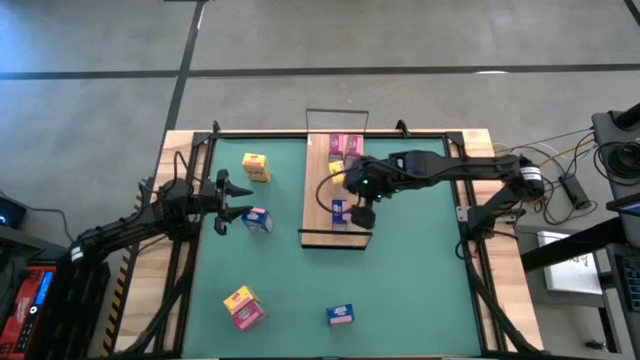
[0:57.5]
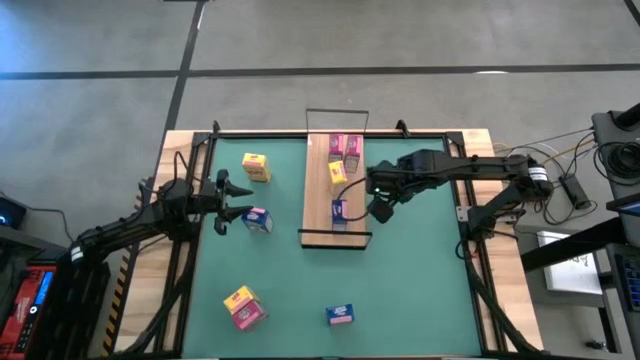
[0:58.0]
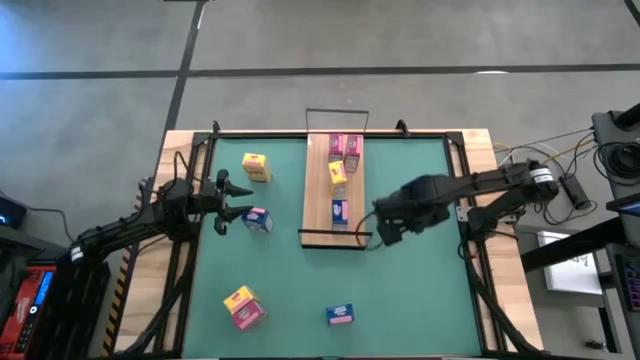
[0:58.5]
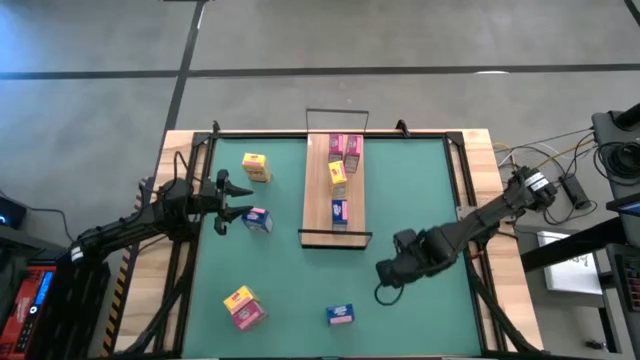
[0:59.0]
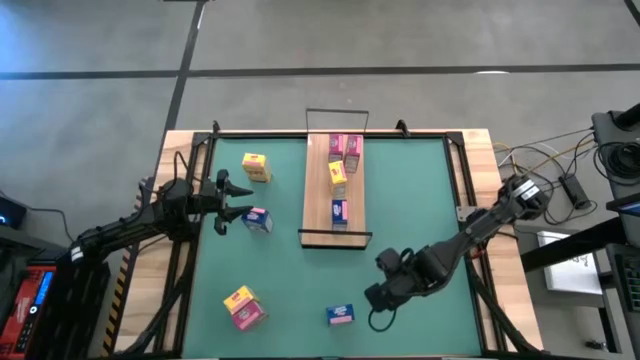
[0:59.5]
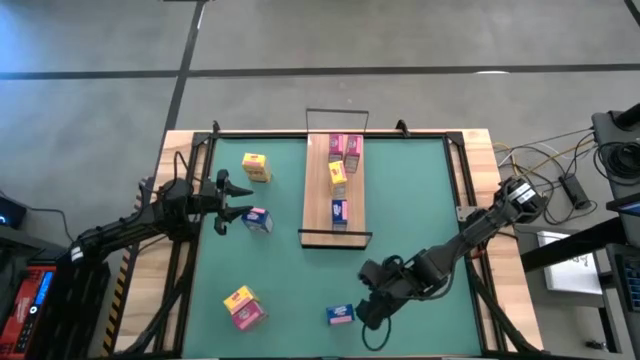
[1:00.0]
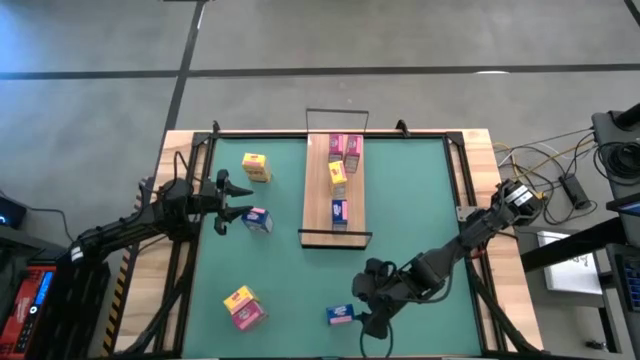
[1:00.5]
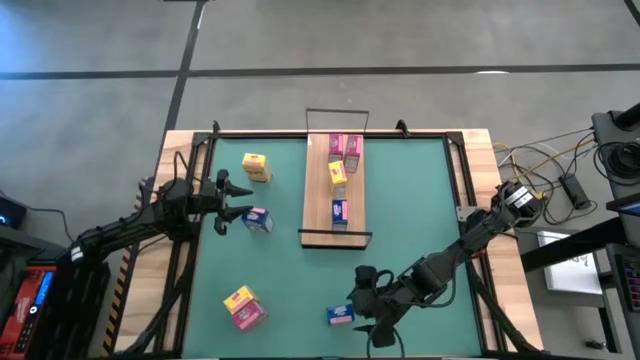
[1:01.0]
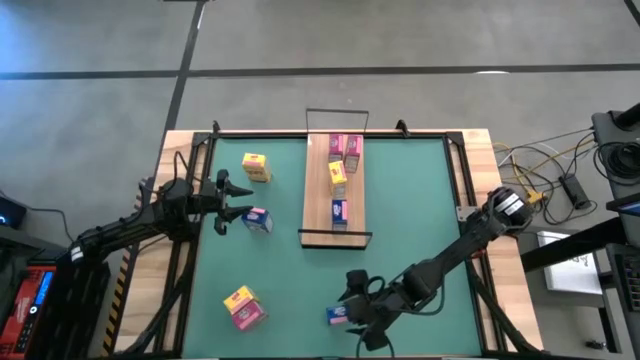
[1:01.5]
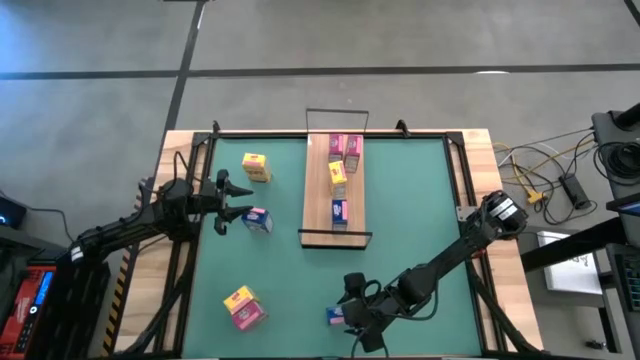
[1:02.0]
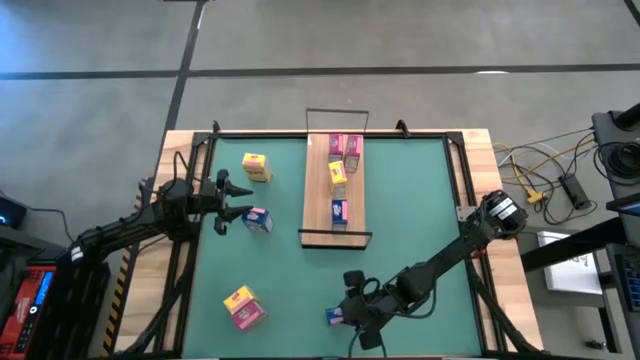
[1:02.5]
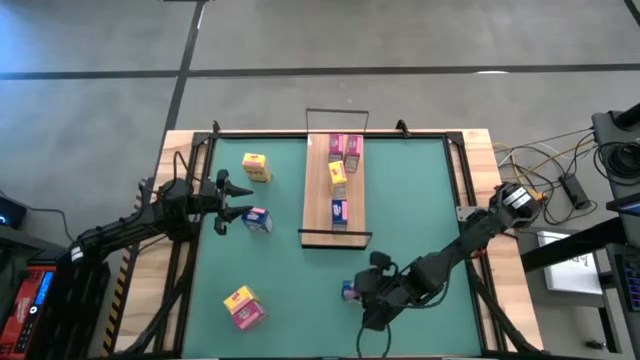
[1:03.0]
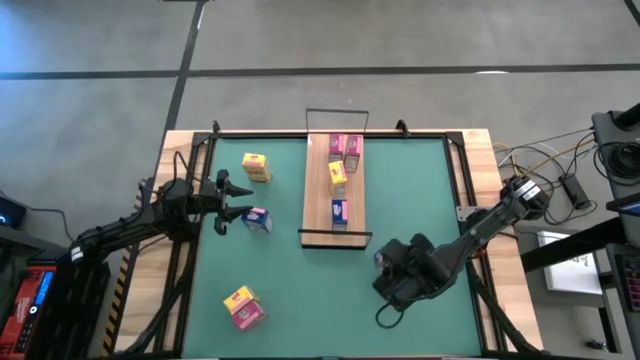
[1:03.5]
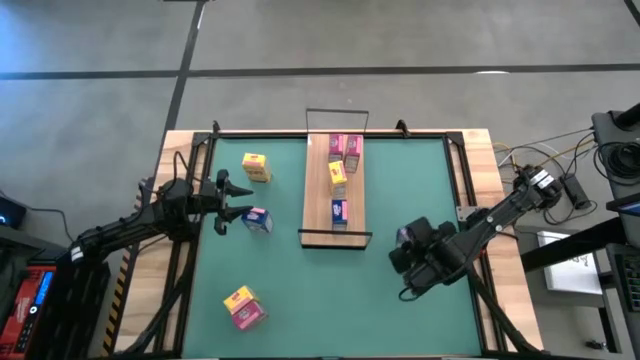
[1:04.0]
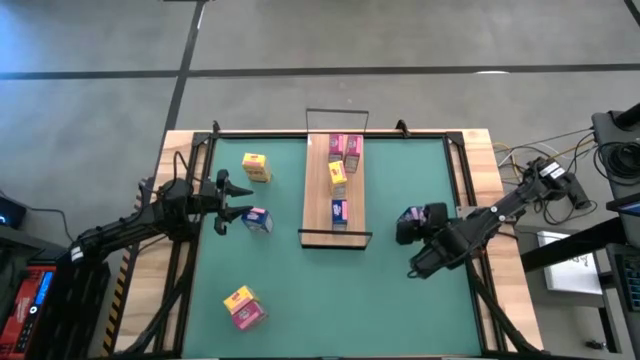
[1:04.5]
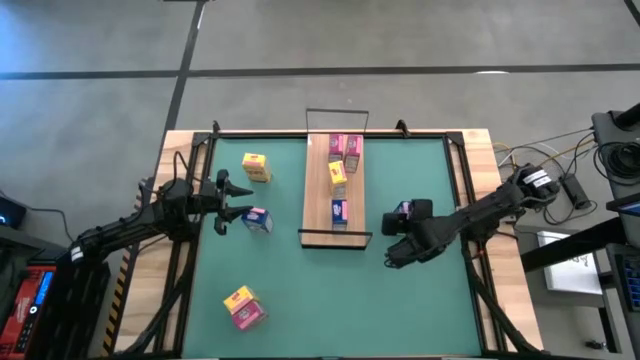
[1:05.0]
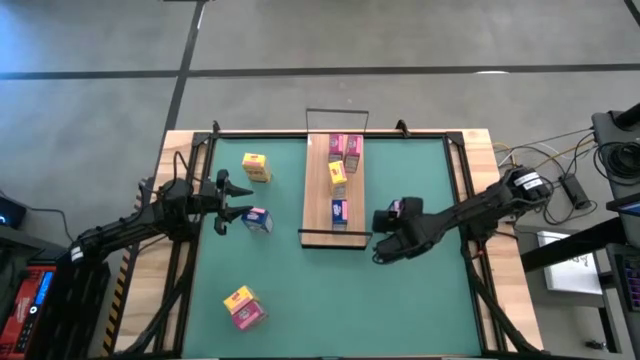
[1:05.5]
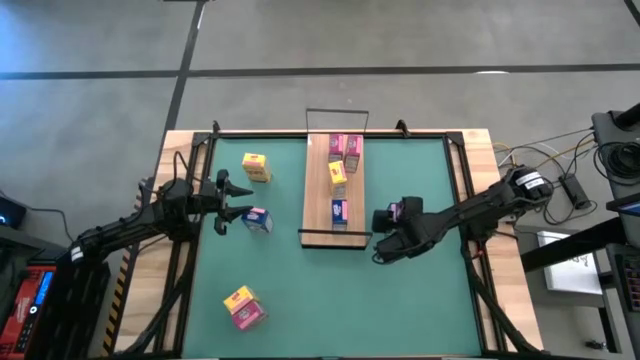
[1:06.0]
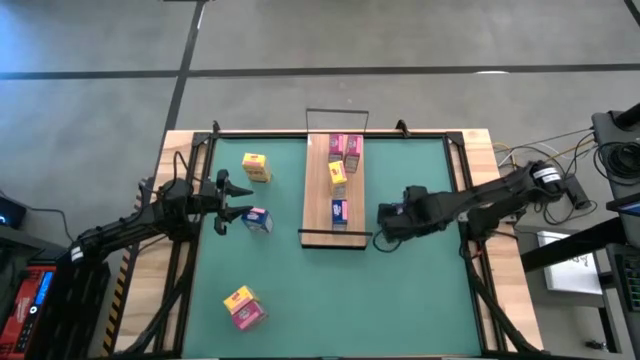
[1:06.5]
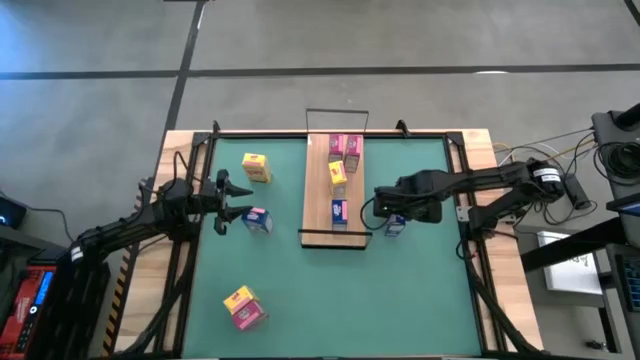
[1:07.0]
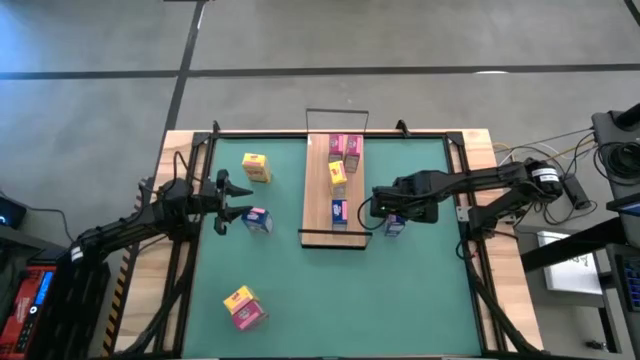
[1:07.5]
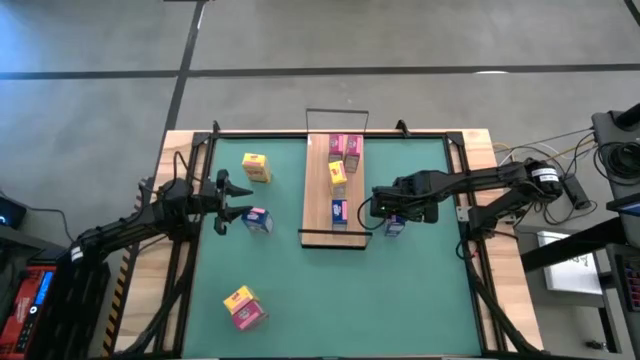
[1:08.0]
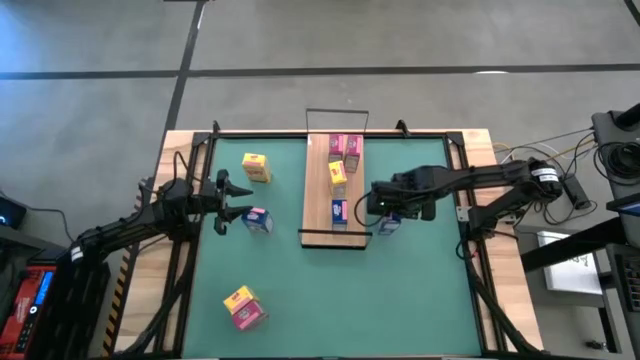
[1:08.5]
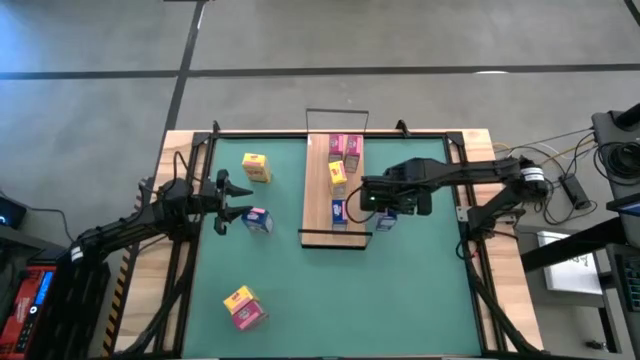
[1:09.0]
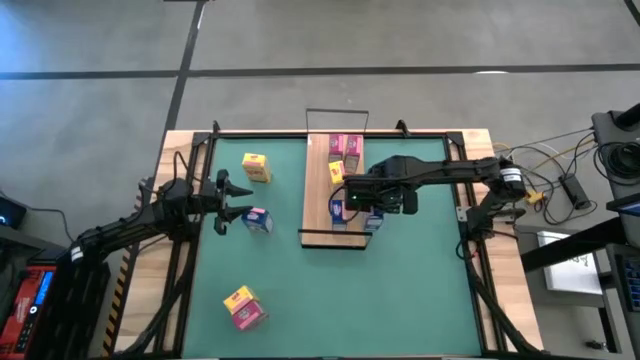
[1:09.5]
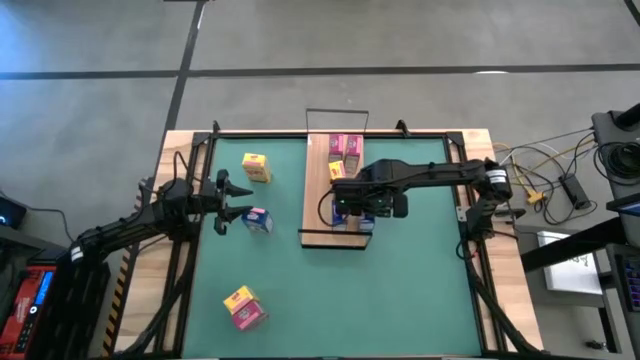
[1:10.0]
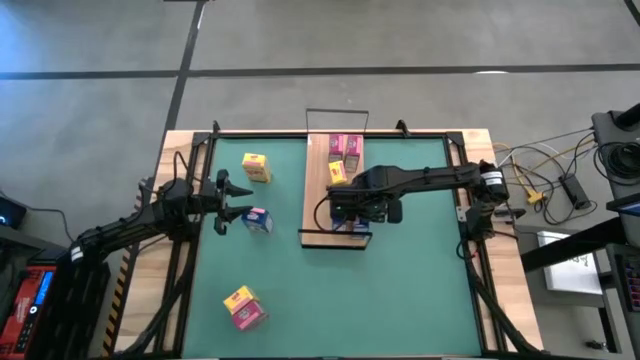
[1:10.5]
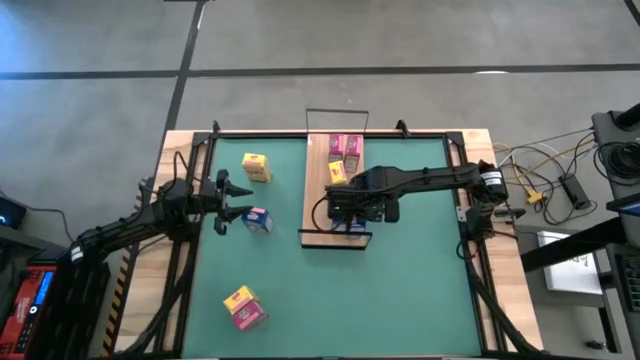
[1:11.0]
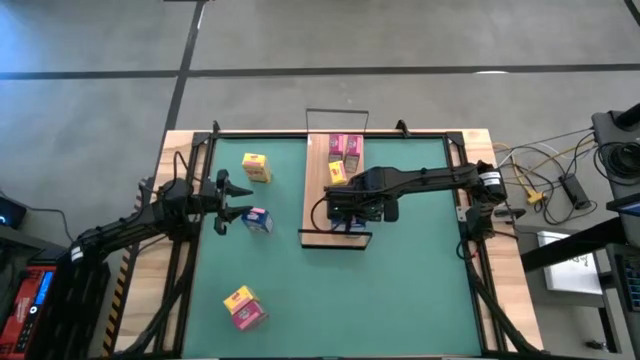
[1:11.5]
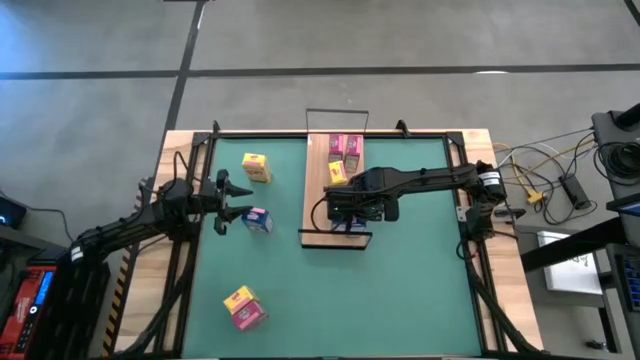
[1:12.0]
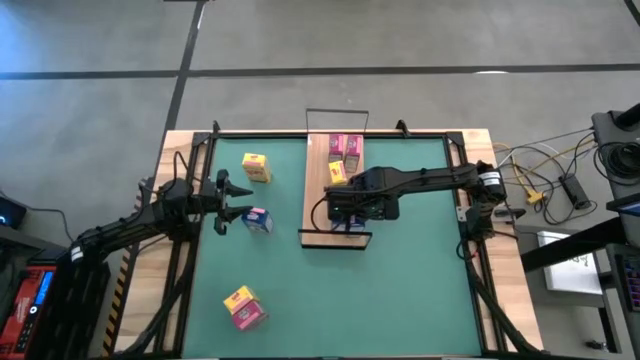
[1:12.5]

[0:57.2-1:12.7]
Task: Stack cereal on shelf
Put the bottom blue cereal box on the shelf

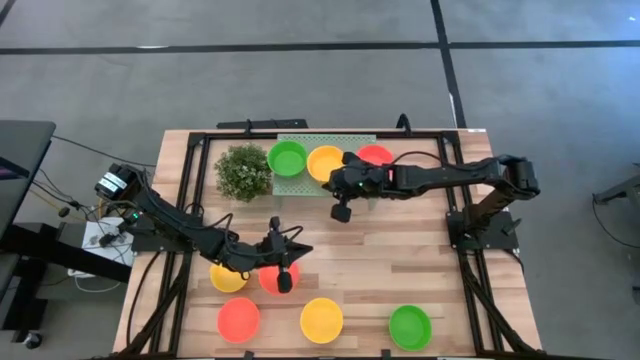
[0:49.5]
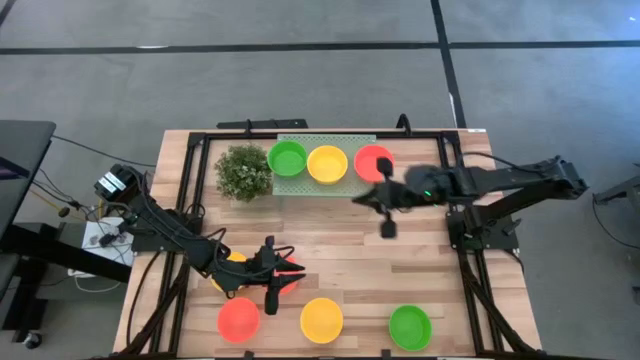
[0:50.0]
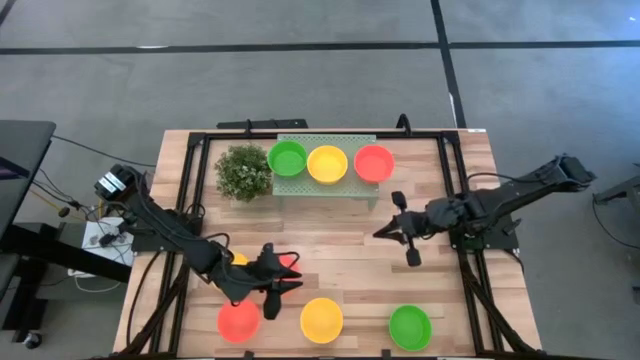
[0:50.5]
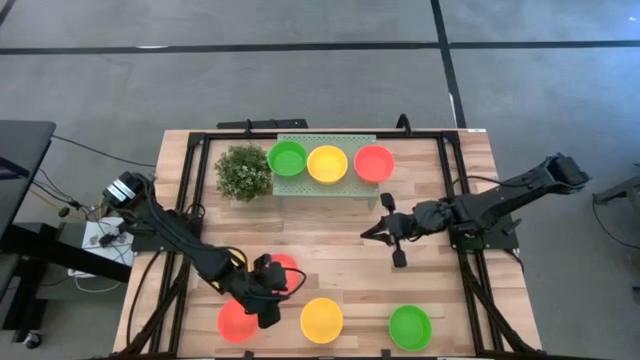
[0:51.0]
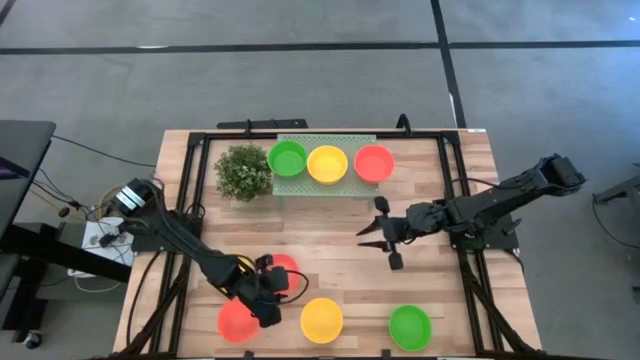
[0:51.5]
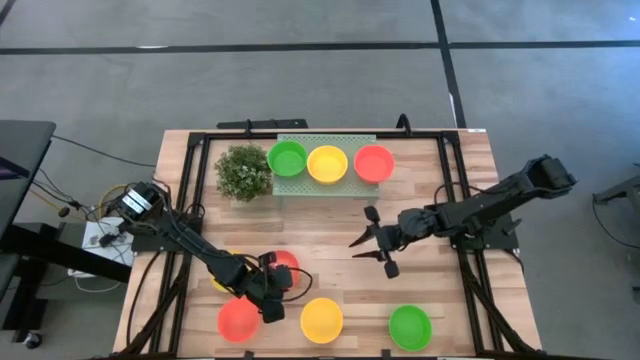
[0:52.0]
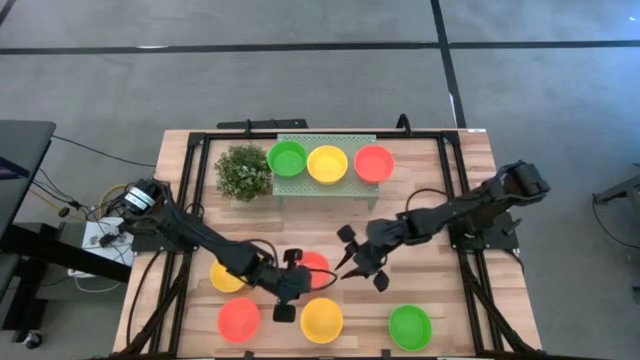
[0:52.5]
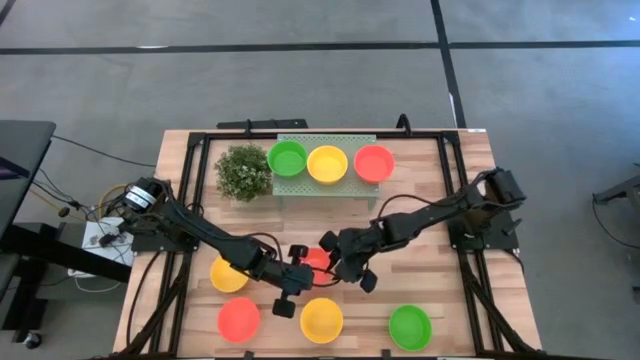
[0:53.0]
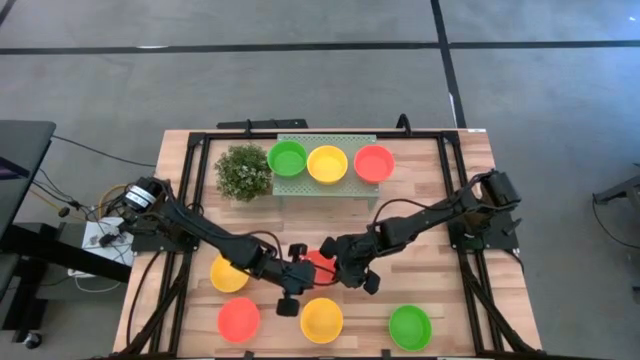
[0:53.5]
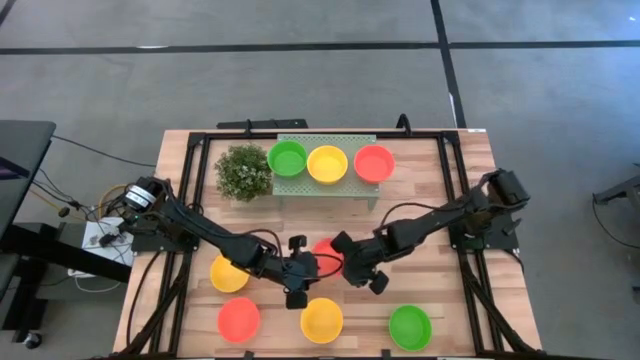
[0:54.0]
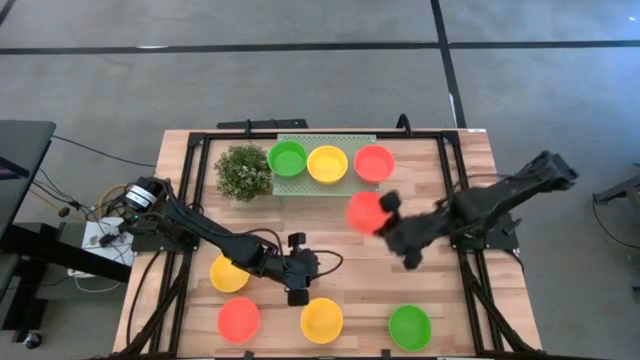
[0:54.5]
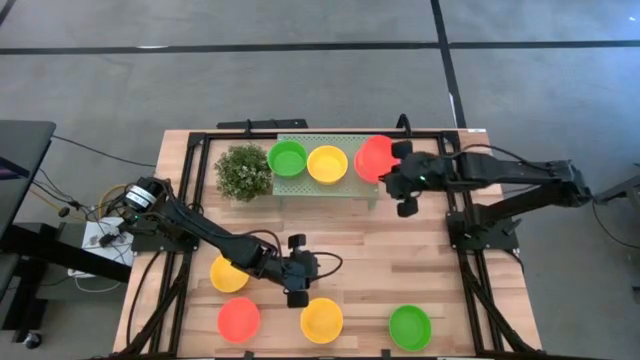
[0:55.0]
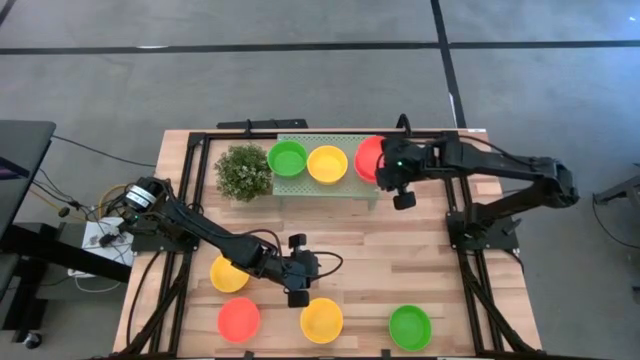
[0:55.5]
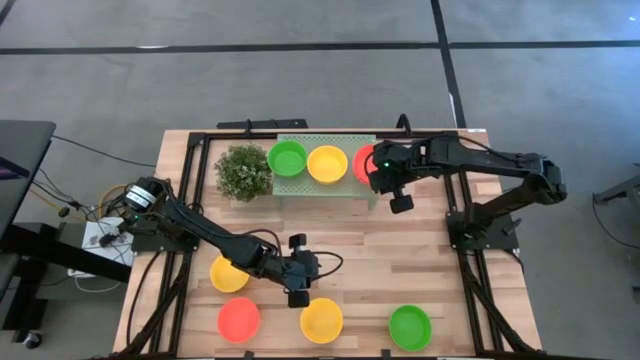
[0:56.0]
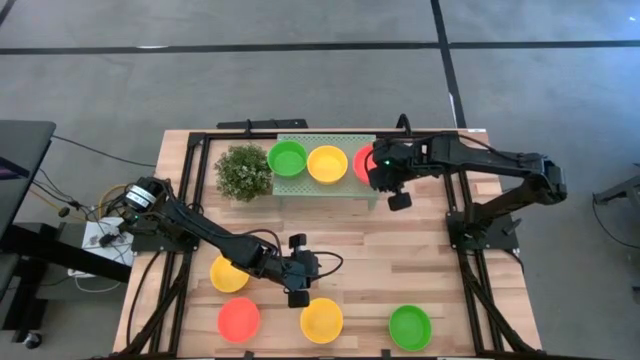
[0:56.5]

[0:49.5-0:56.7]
Task: Pick & Place Mini bowls
Stack the orange bowl on the orange bowl on the shelf
